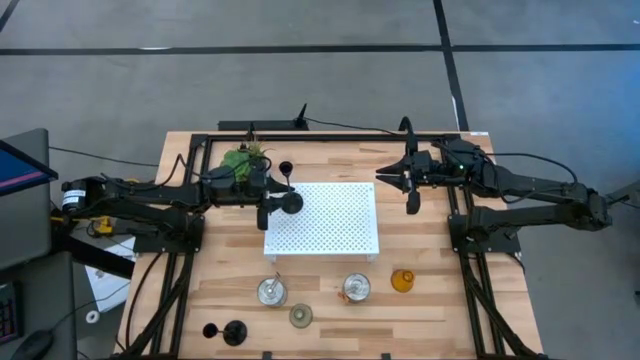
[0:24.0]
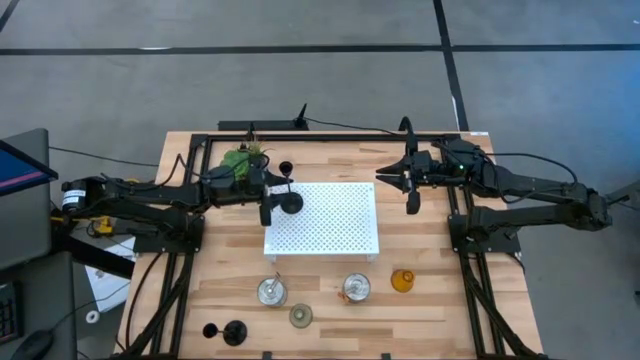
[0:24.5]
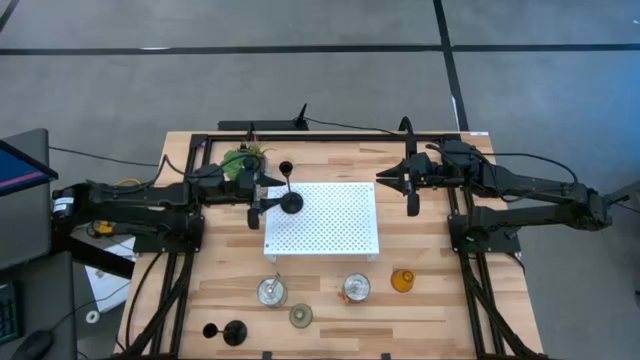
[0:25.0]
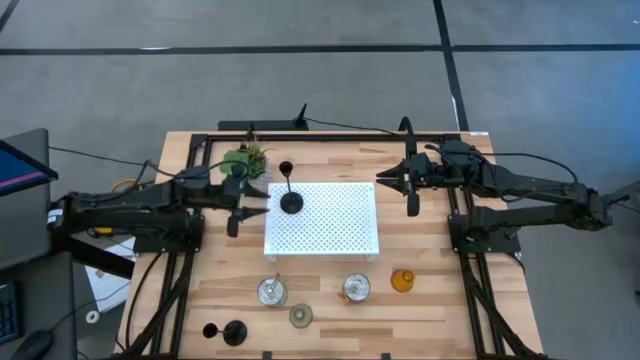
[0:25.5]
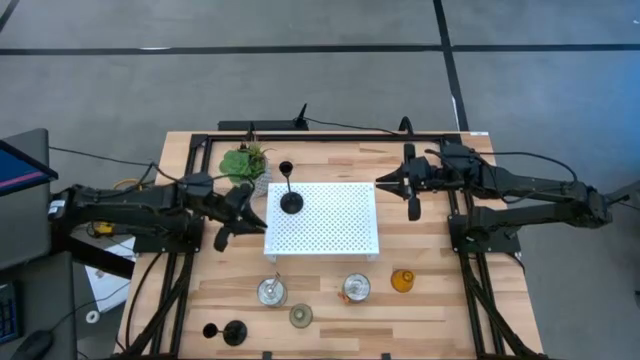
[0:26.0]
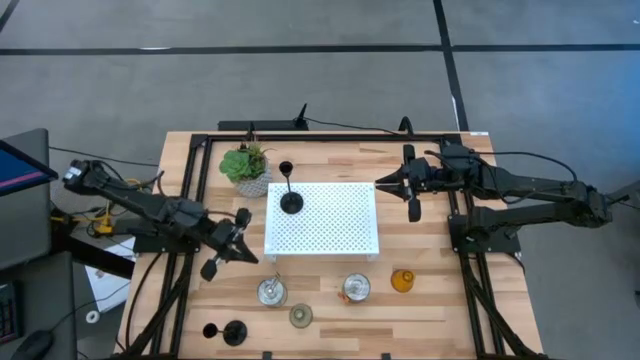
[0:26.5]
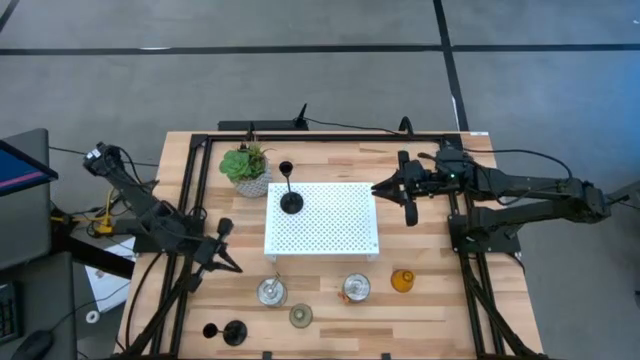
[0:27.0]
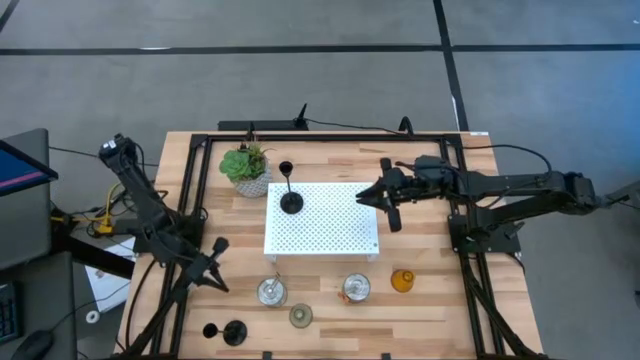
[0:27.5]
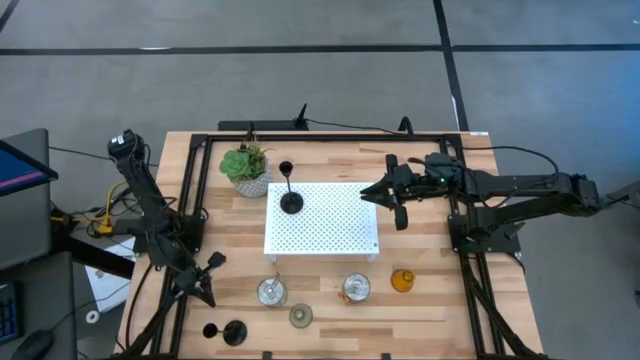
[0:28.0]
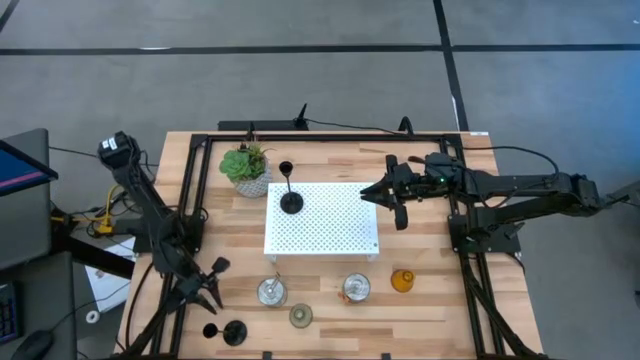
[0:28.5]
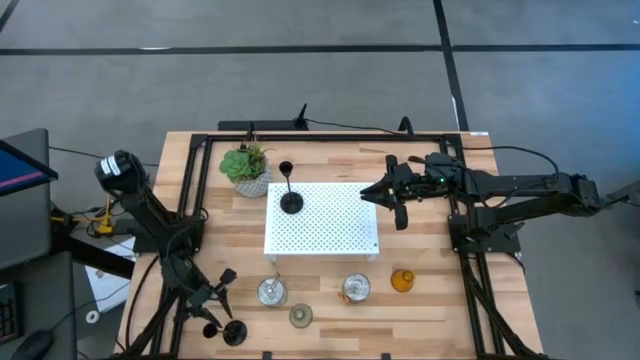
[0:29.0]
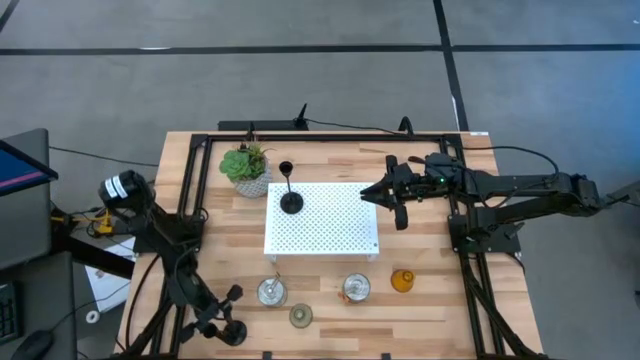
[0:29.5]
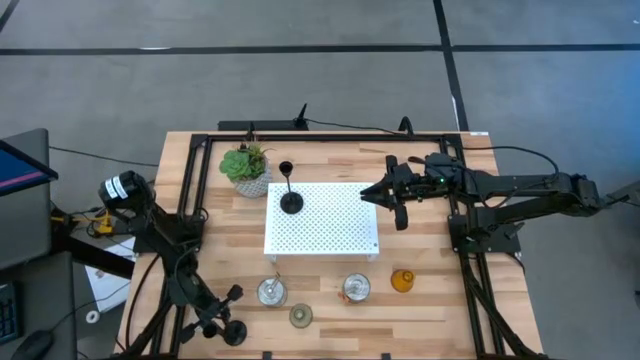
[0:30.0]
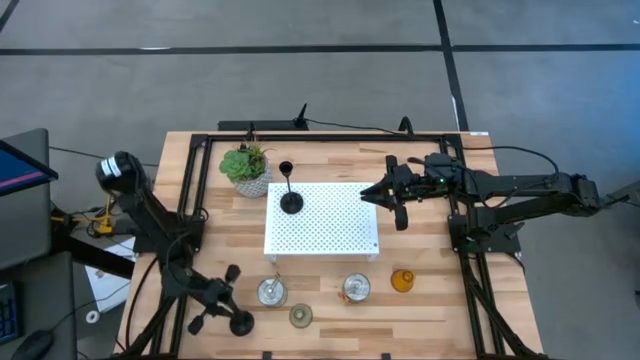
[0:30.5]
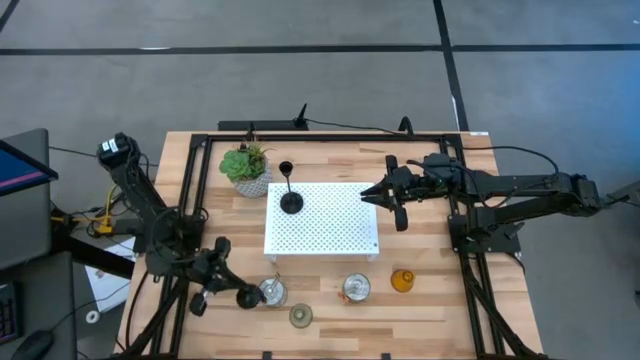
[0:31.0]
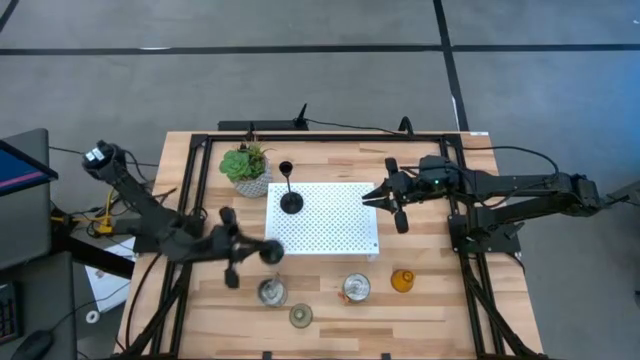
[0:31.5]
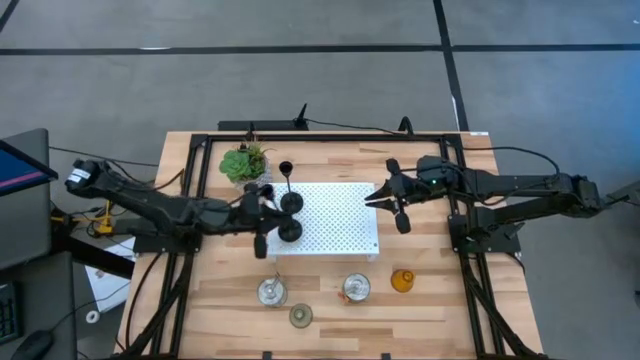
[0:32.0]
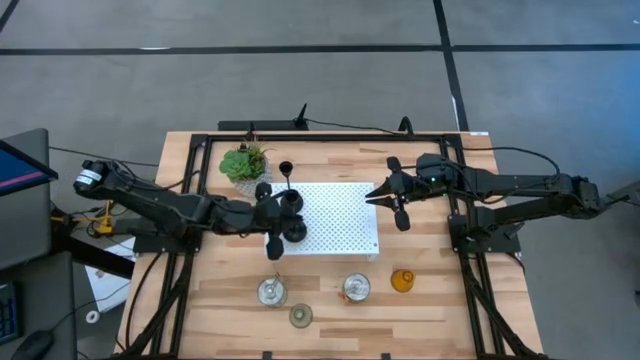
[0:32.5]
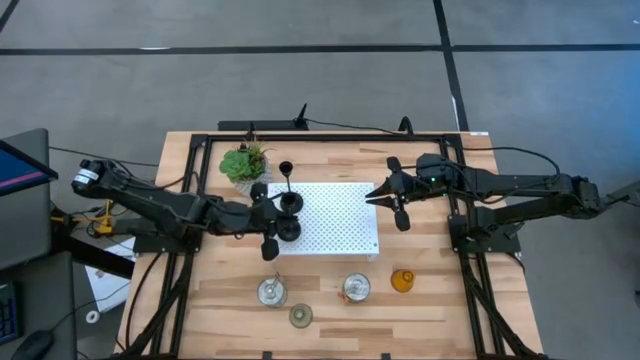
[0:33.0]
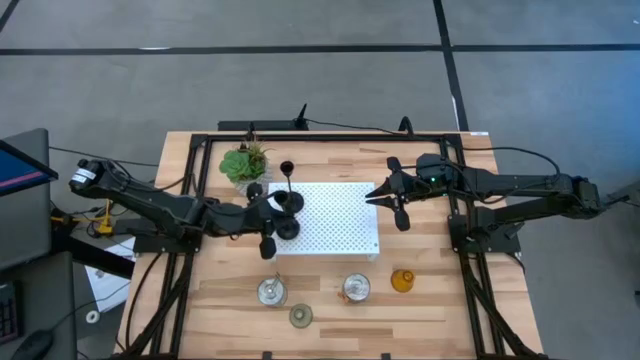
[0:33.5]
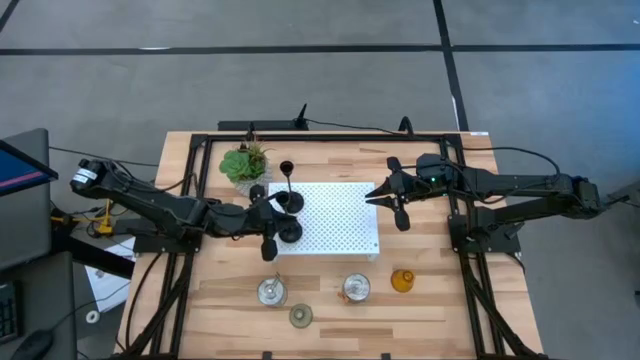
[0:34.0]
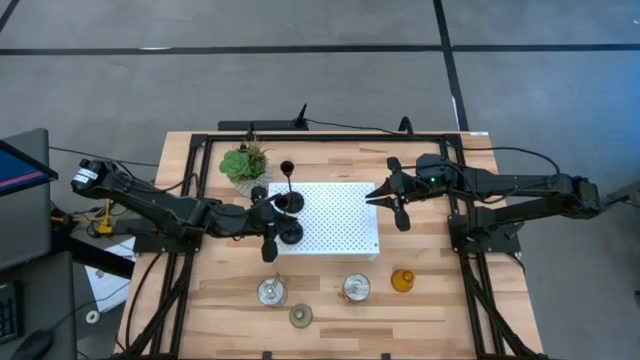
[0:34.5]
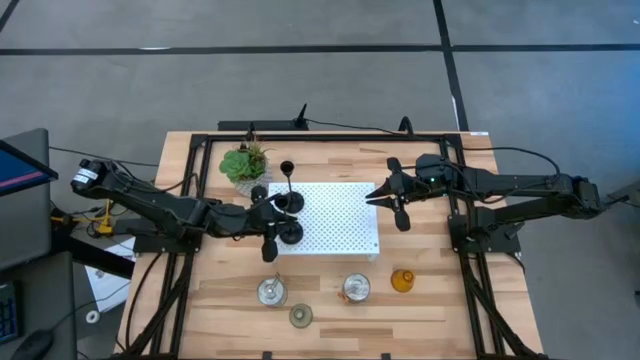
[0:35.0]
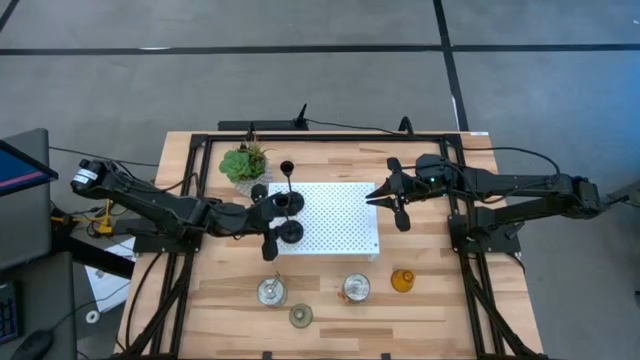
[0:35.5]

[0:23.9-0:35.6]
Task: Pick & Place candle stick holders
Align the black candle holder with the black candle holder on the shelf
